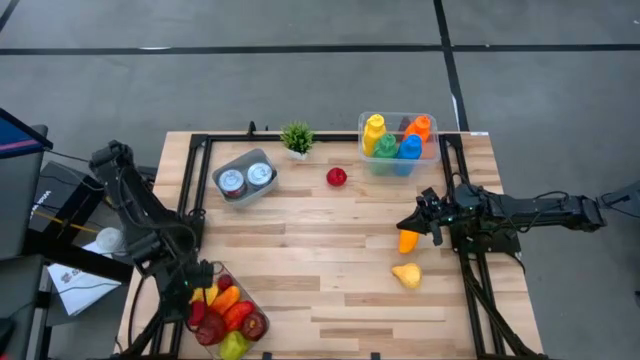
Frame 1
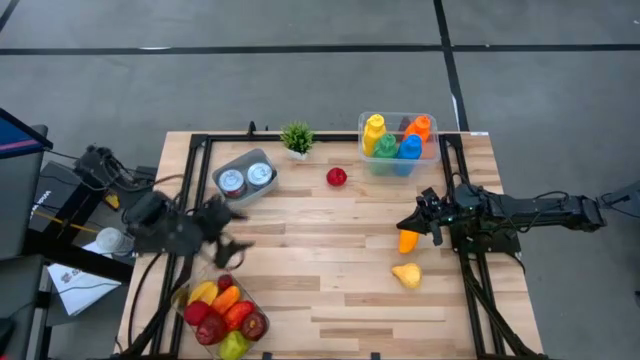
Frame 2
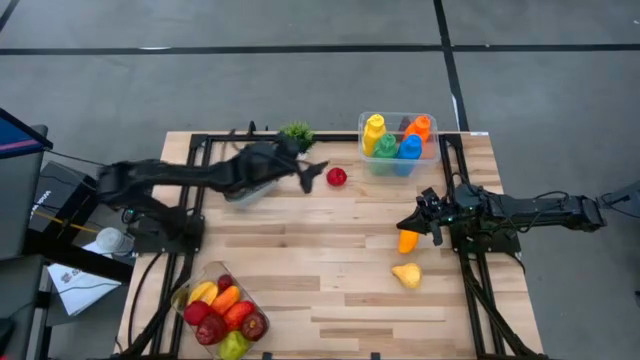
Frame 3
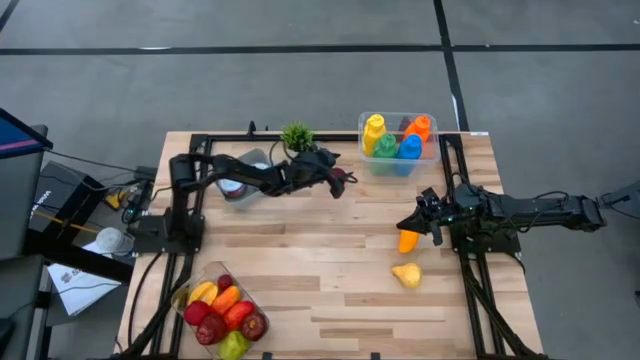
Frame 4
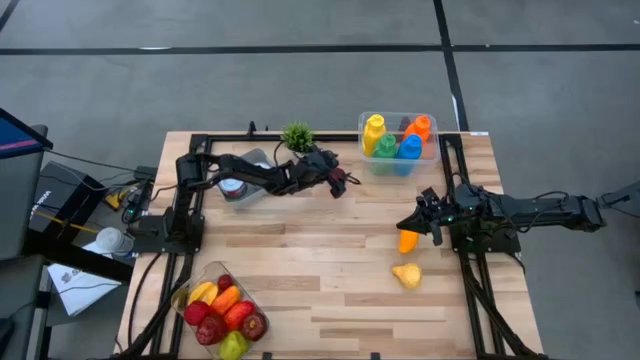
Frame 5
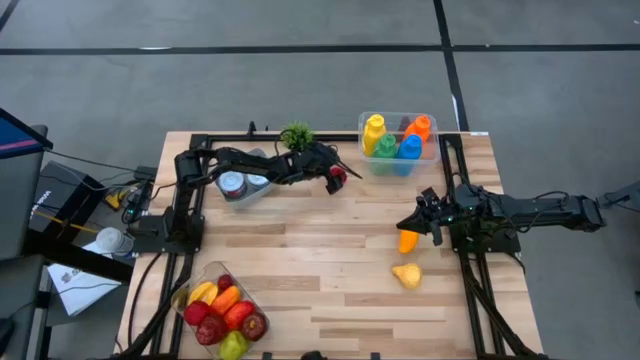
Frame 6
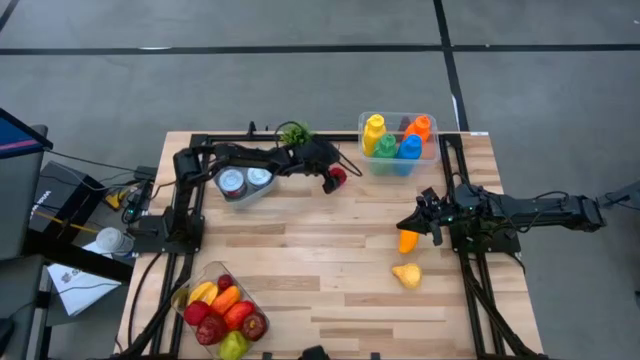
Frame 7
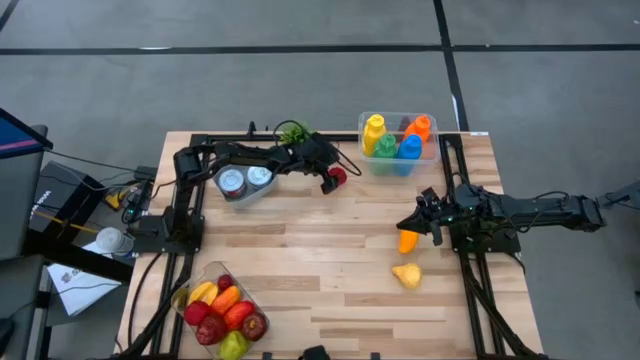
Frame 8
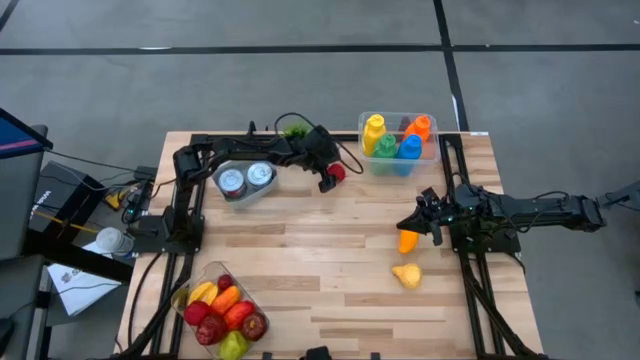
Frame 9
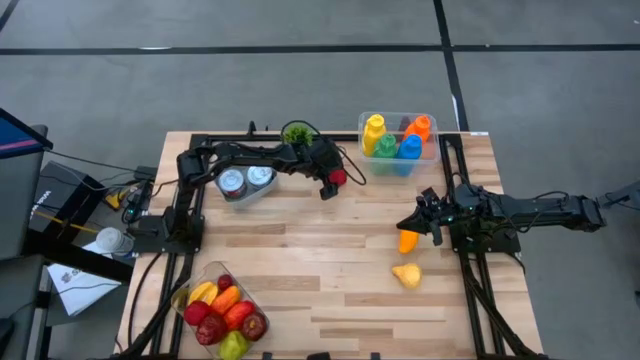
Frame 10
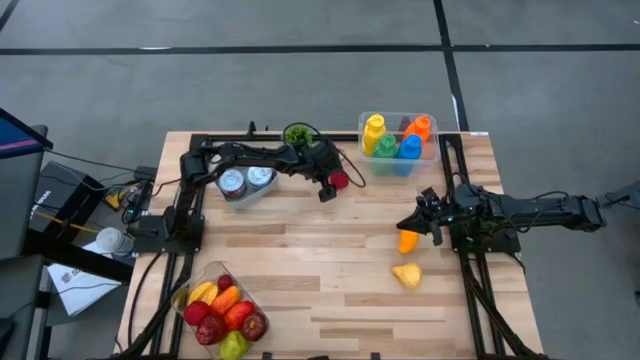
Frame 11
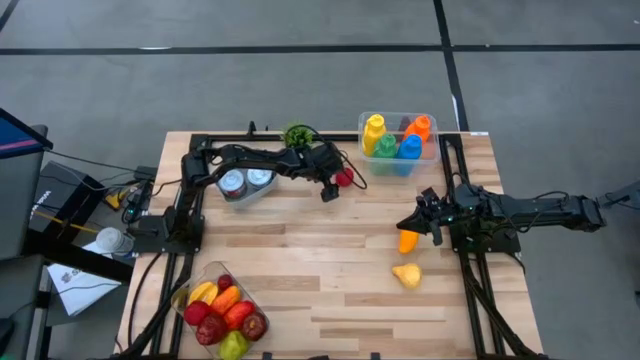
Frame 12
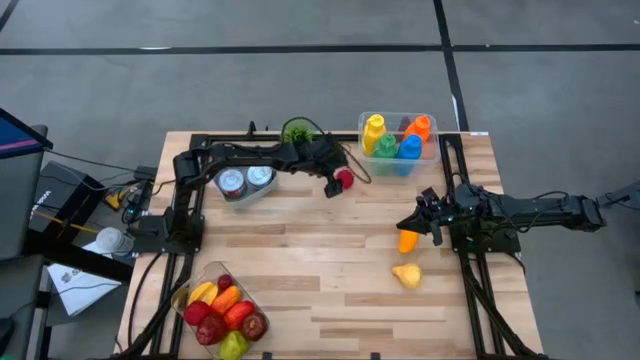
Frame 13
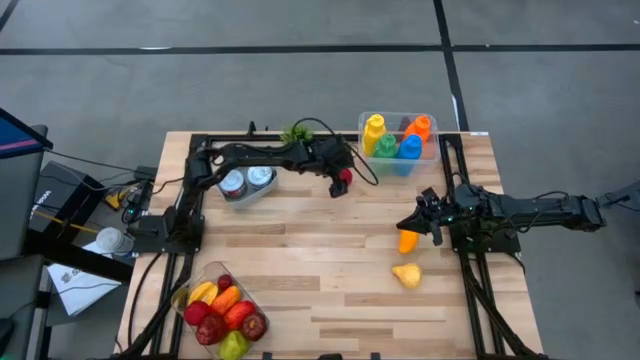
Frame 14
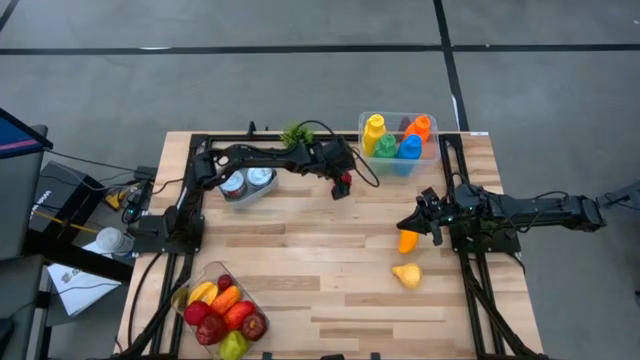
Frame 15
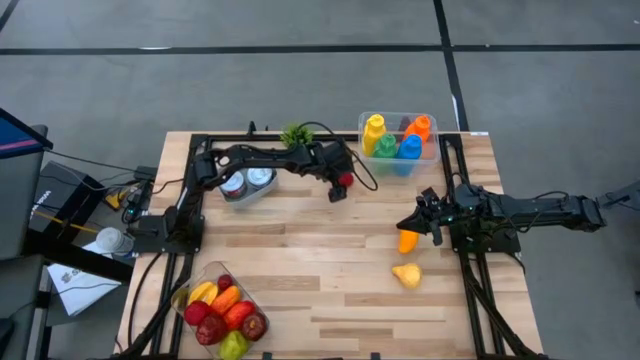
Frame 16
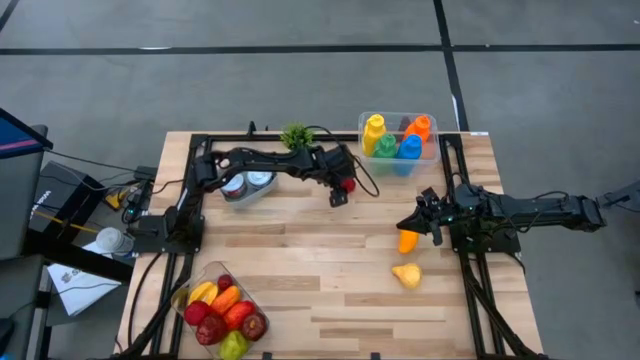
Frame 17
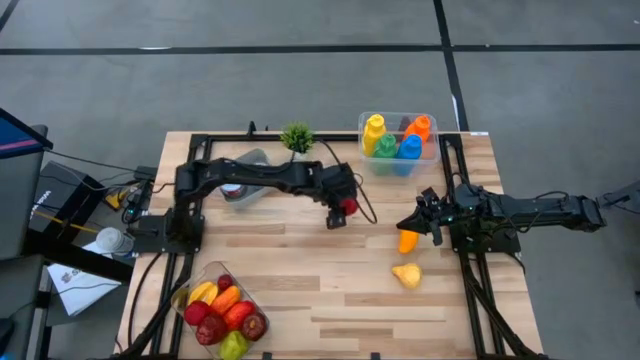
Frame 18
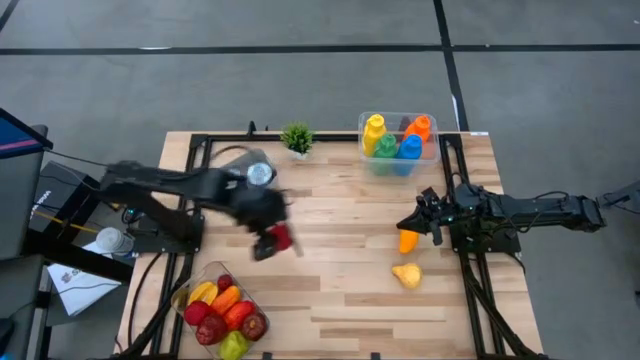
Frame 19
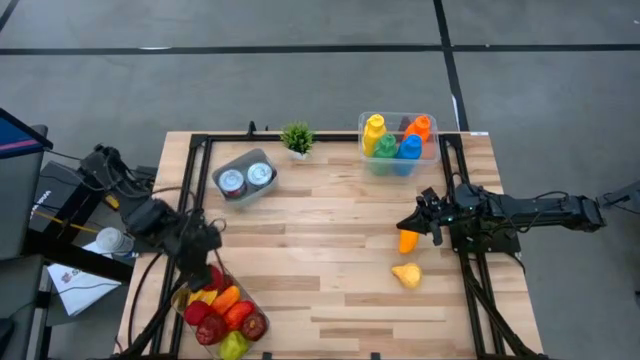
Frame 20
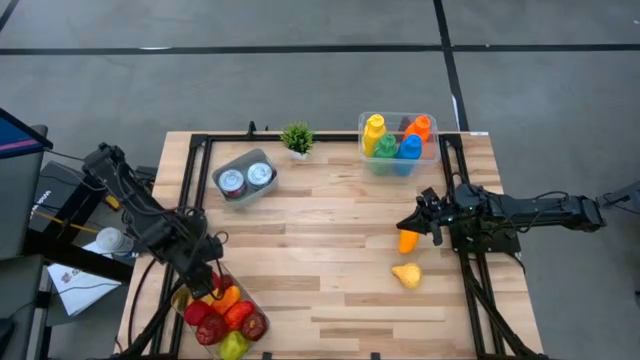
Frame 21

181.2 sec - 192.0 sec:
Task: Pick & Place Food Item
Put the red apple into the bottom transparent bin

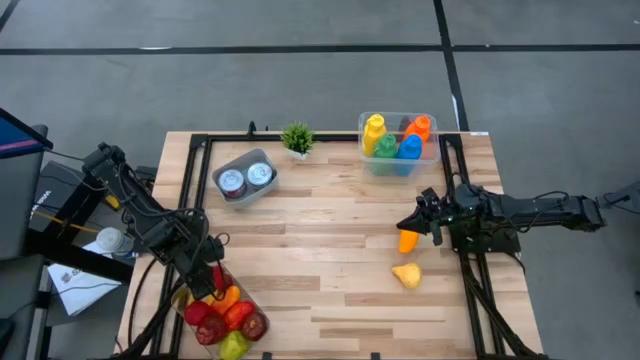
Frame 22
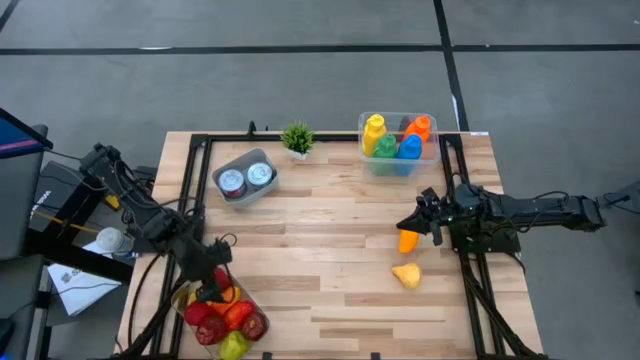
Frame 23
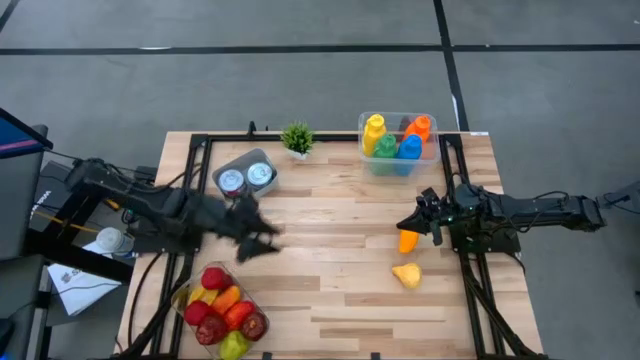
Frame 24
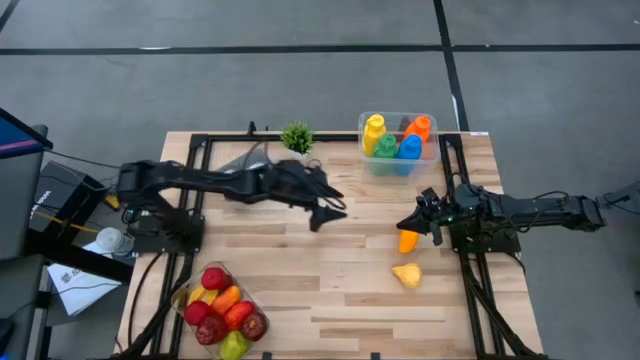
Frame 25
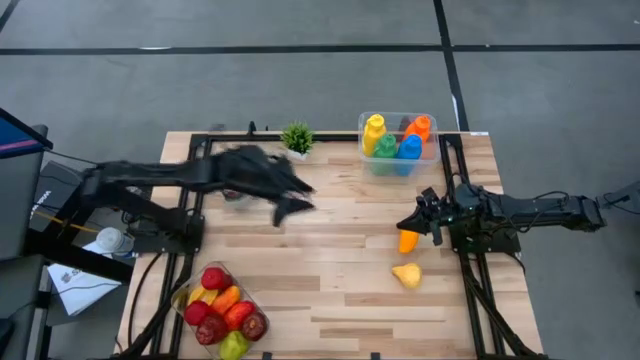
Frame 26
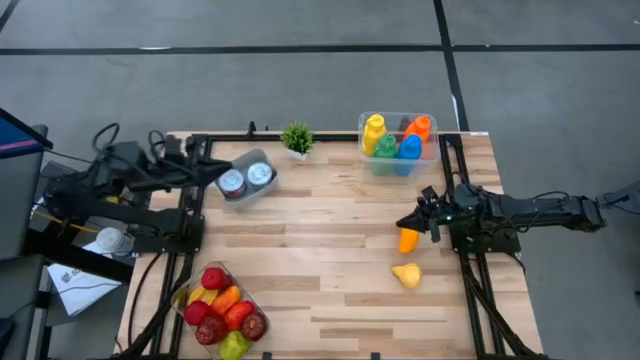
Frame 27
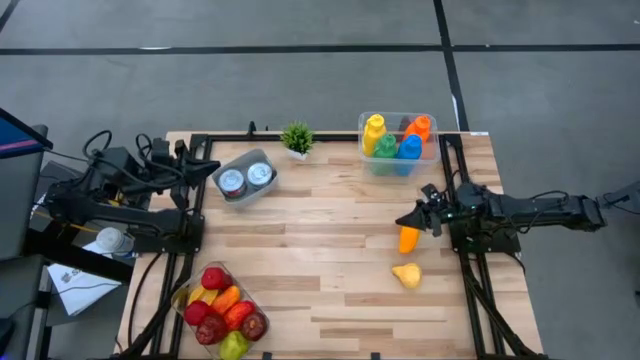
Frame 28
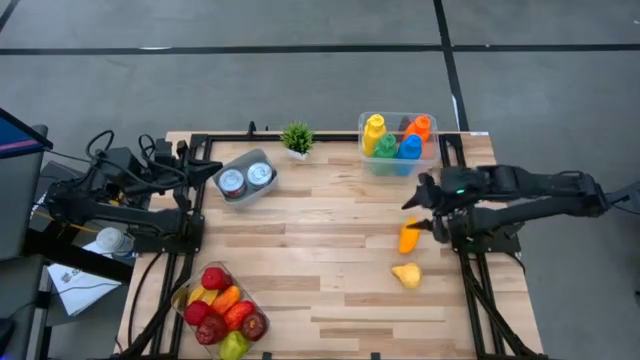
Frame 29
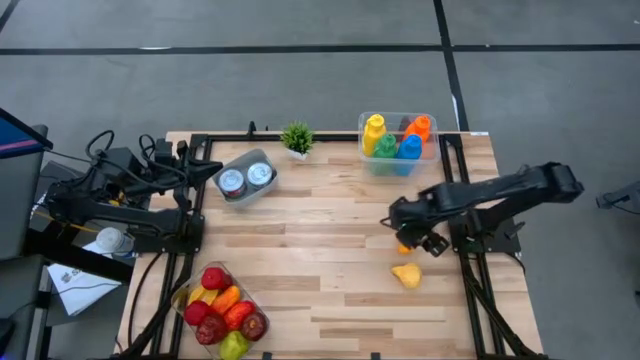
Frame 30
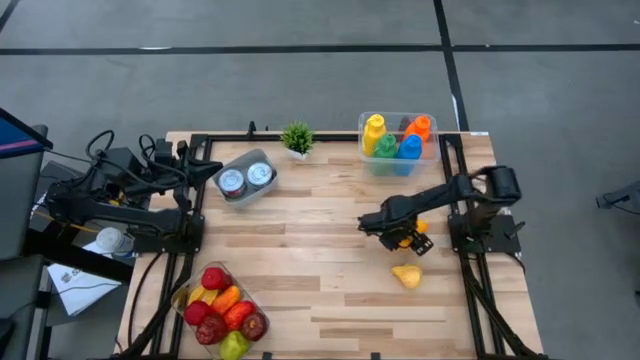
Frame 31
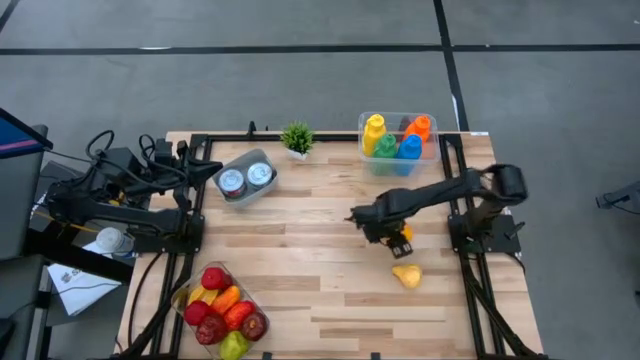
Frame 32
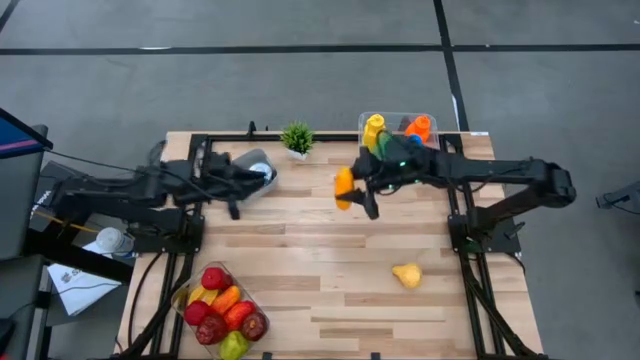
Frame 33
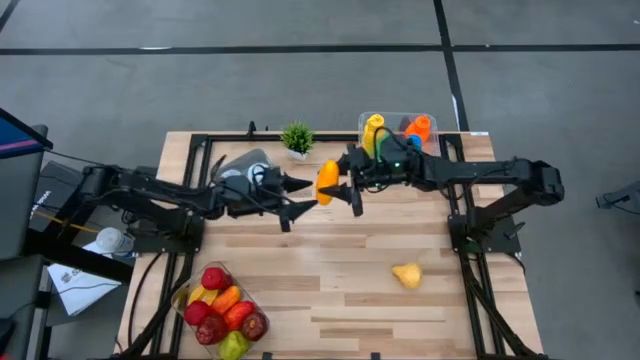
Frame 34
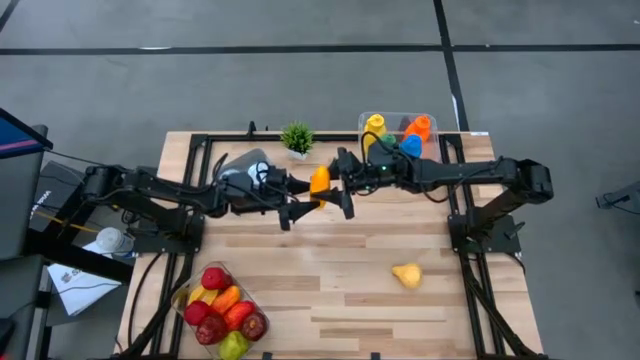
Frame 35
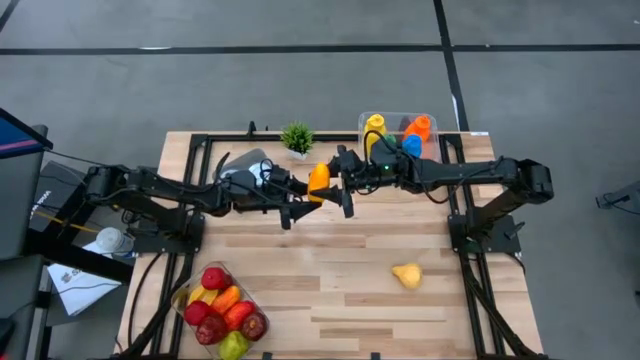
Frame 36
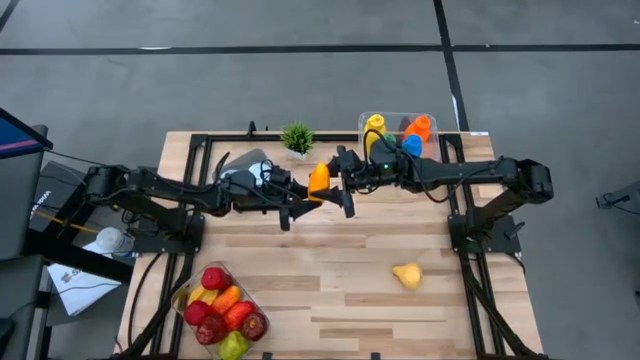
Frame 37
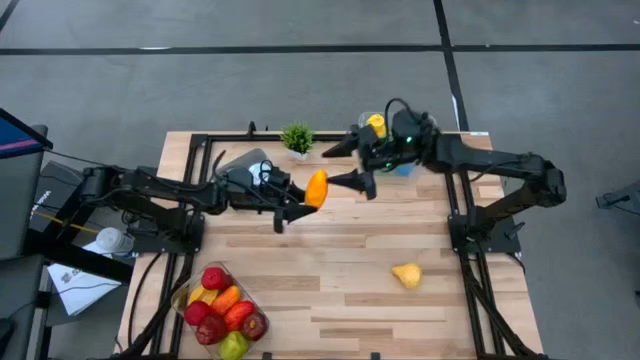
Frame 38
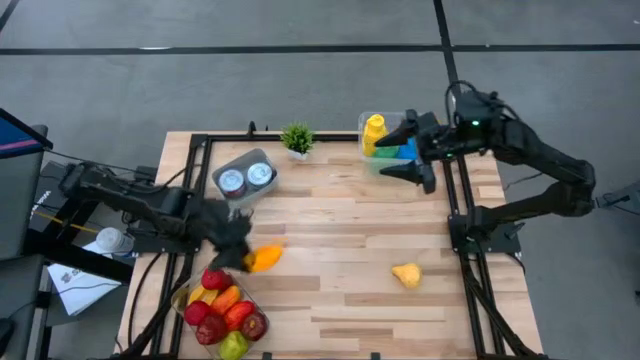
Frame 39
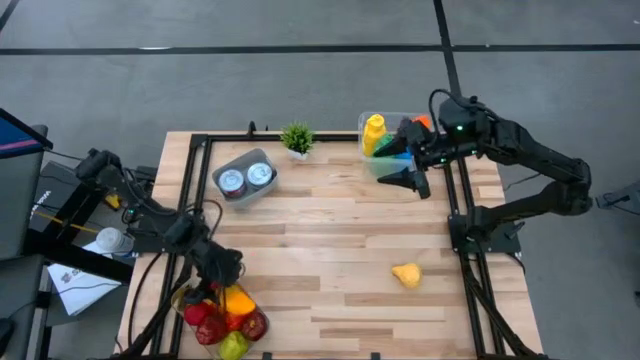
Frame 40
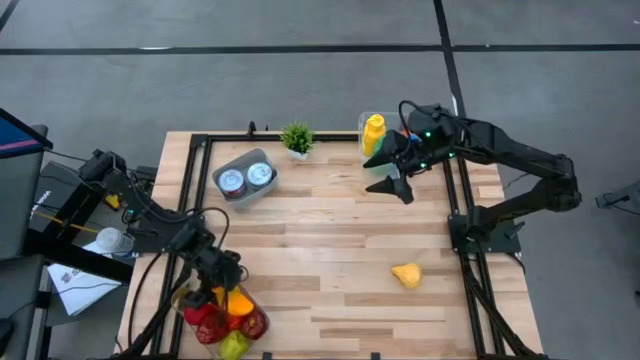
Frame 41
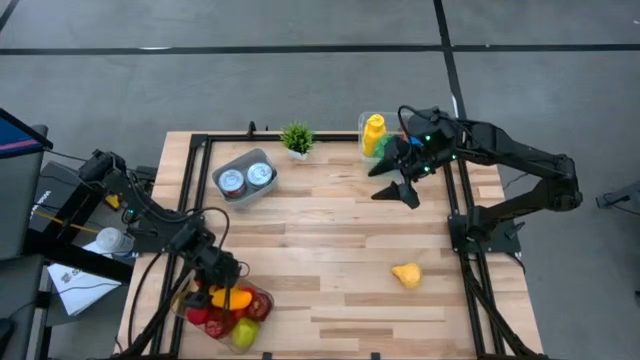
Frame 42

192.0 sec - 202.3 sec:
Put the yellow mango into the bottom transparent bin

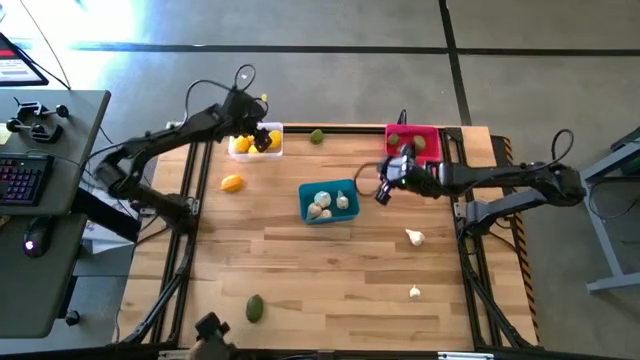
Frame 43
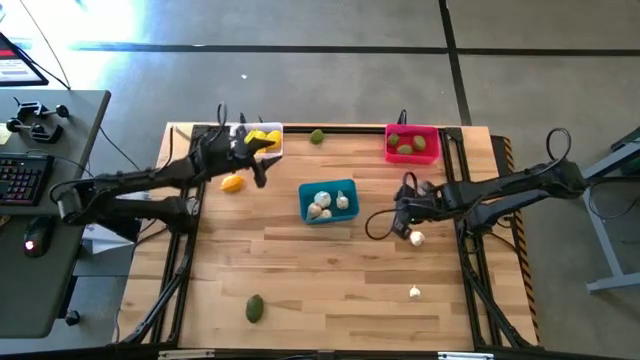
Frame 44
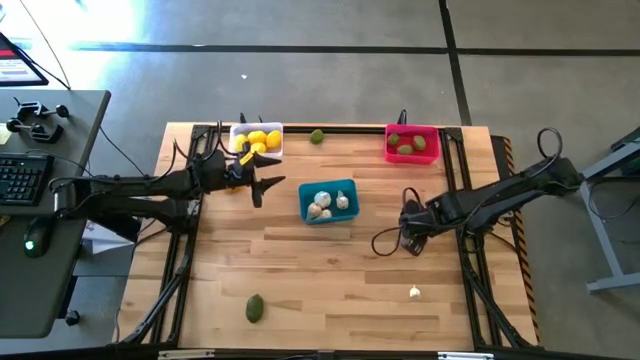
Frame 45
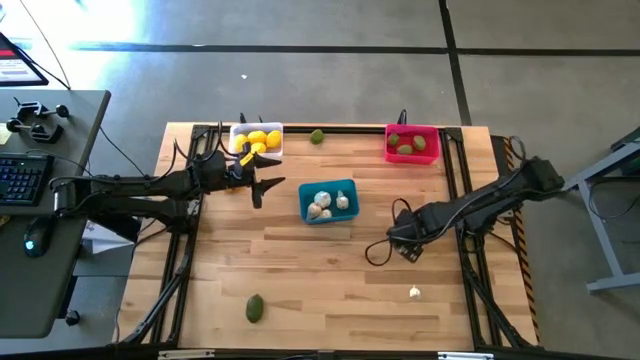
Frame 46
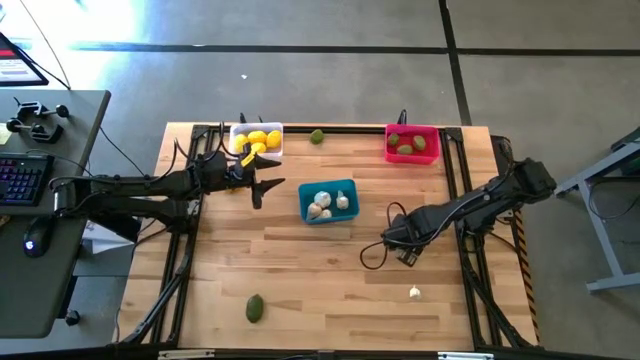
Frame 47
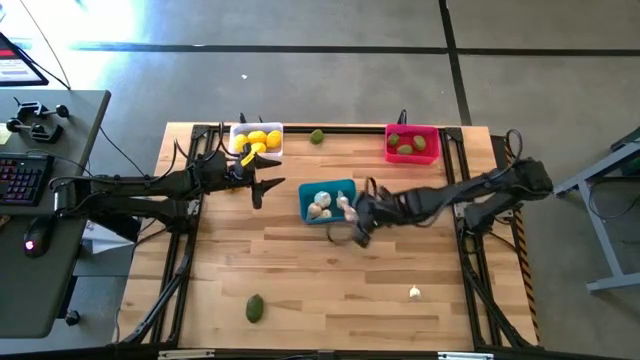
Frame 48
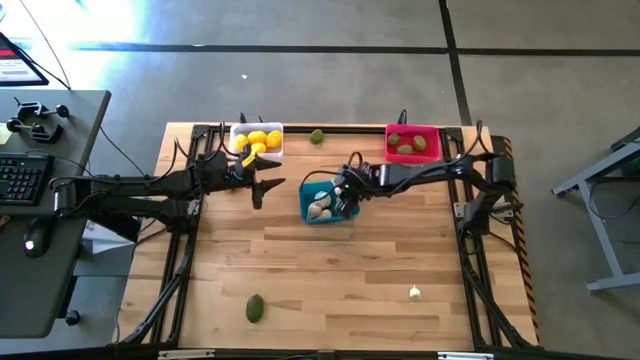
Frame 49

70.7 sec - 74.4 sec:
Task: Sort produce into baskets
Put the garlic into the blue bin
